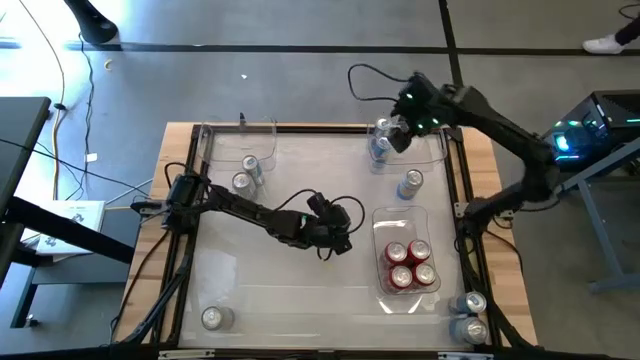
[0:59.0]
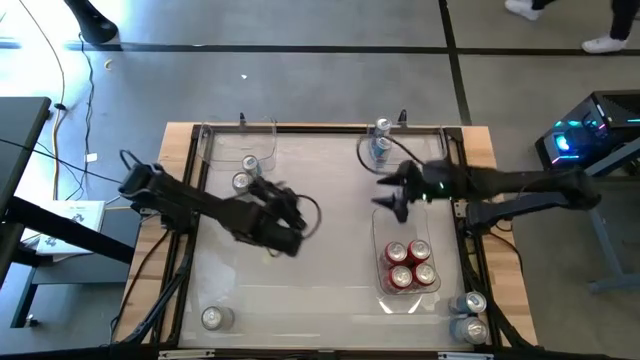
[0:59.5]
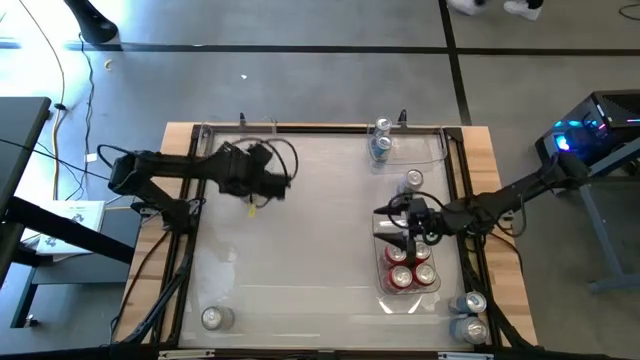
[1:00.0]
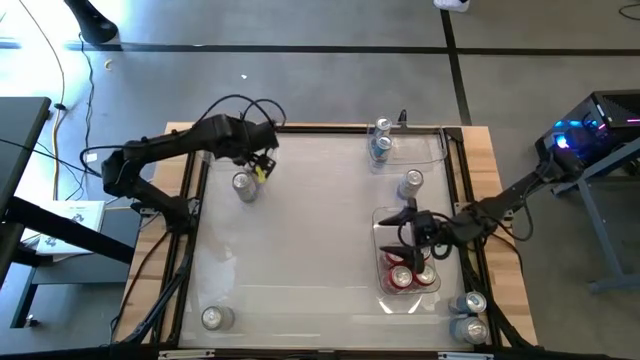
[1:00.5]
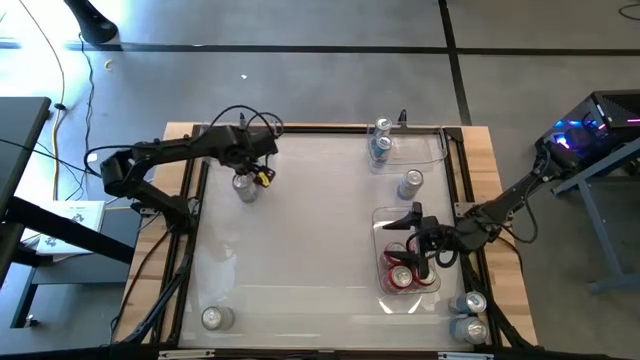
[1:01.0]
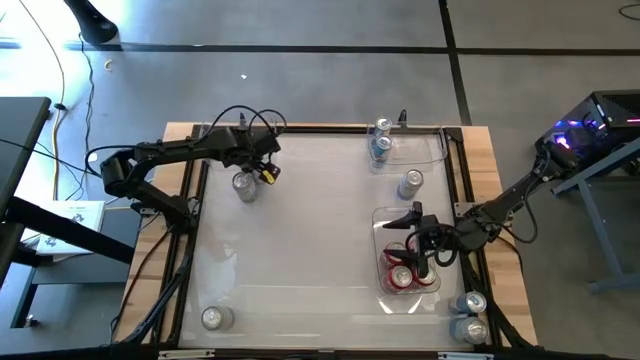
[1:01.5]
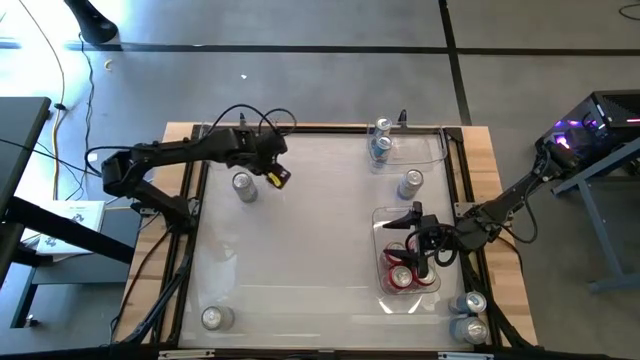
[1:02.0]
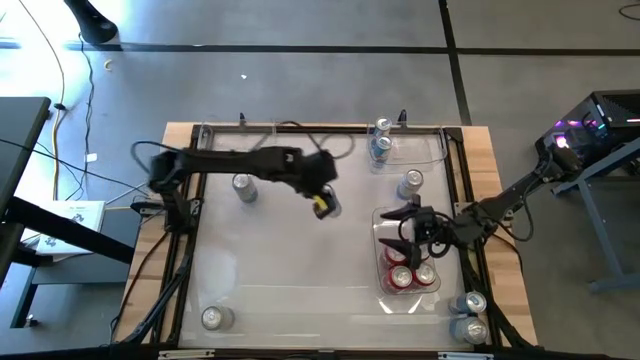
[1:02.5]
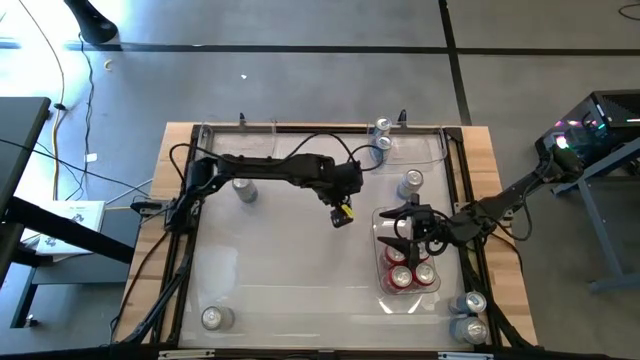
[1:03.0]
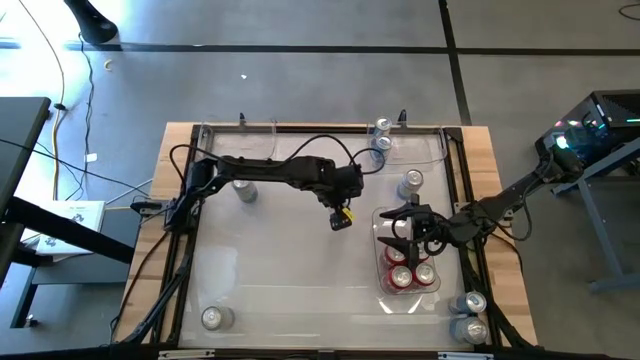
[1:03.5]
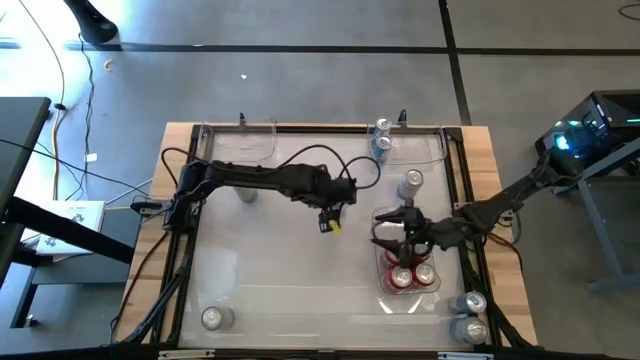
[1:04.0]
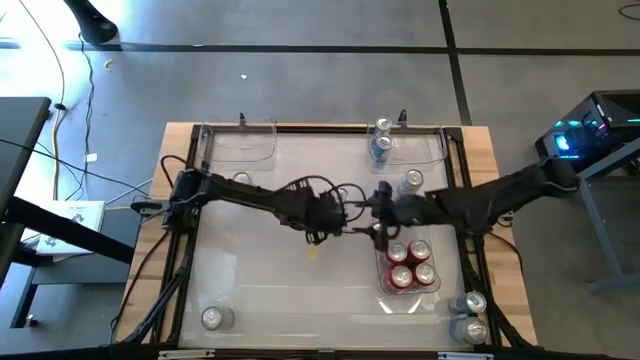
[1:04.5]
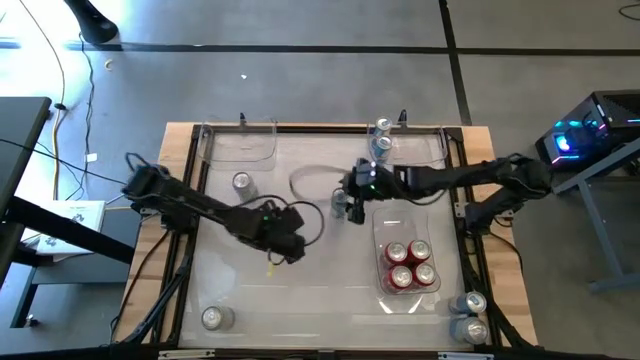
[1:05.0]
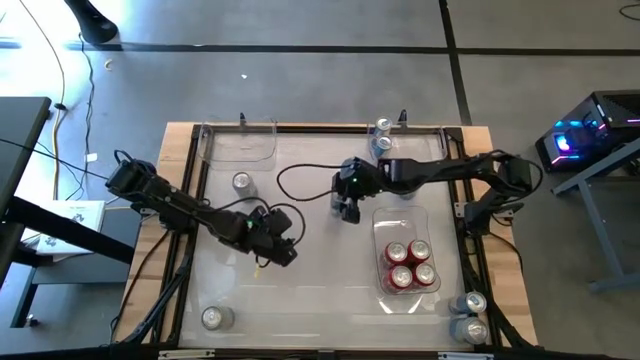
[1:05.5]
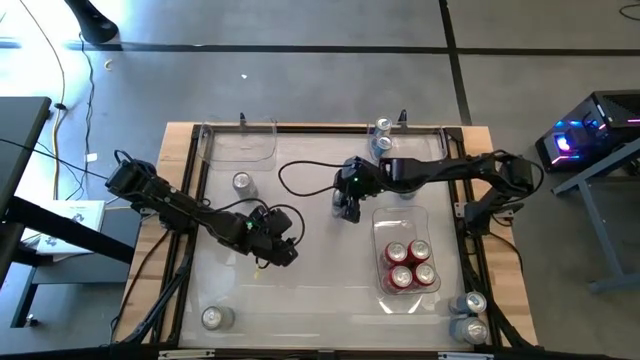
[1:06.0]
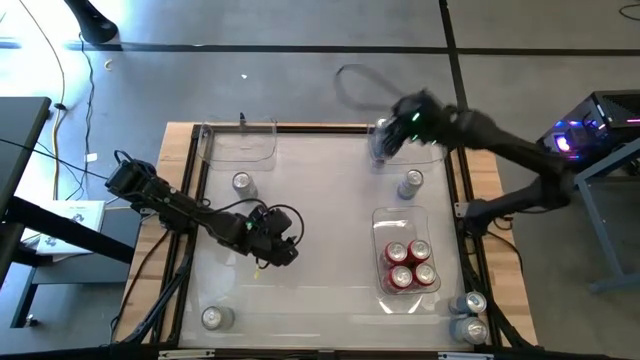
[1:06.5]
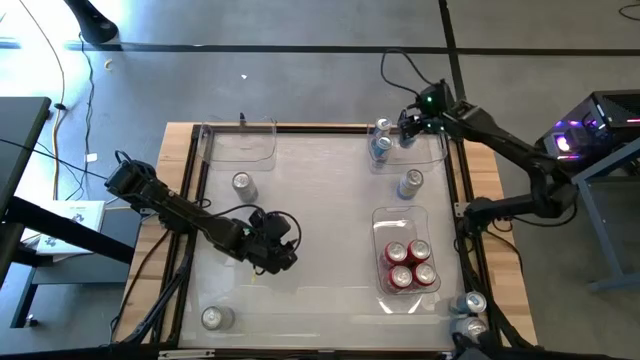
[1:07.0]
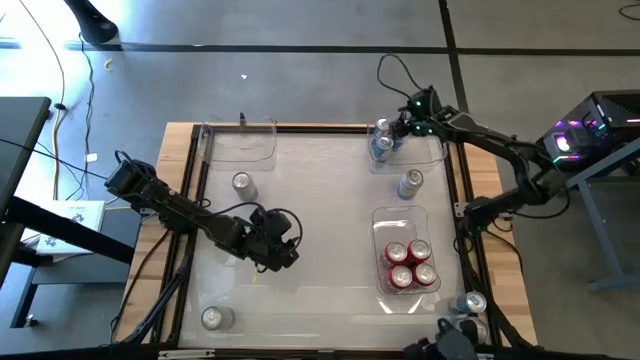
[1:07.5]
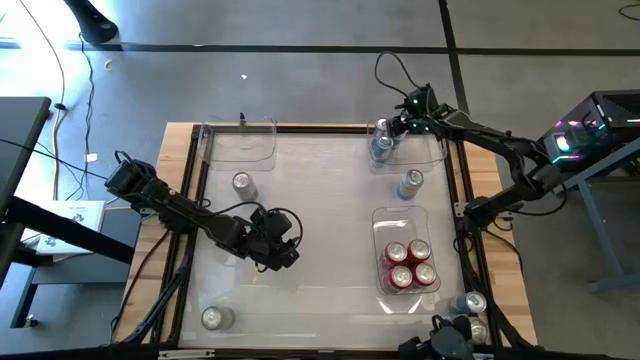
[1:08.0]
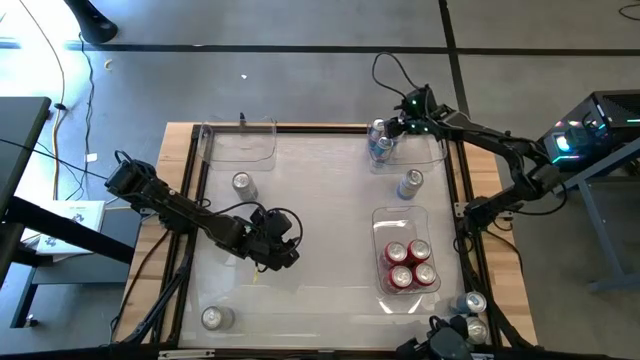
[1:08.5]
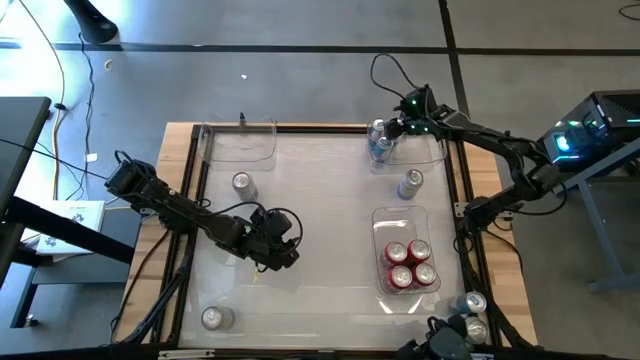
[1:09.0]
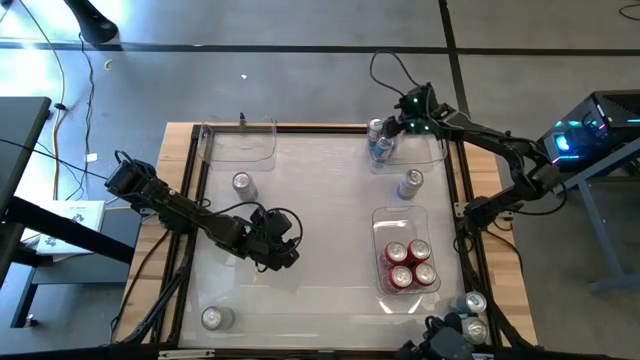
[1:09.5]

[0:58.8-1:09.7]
Task: Sort soda cans
Put the top left blue soda can into the top right transparent bin

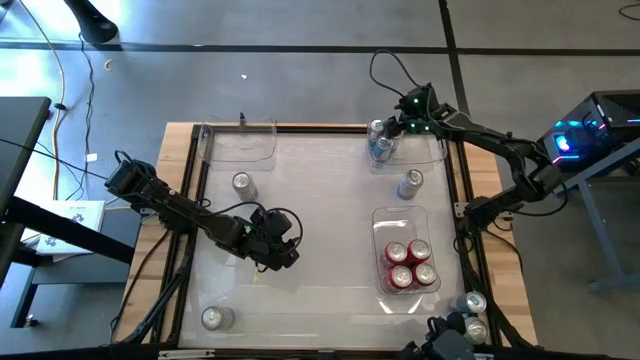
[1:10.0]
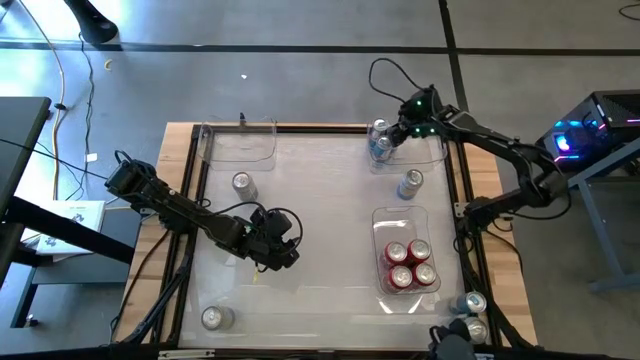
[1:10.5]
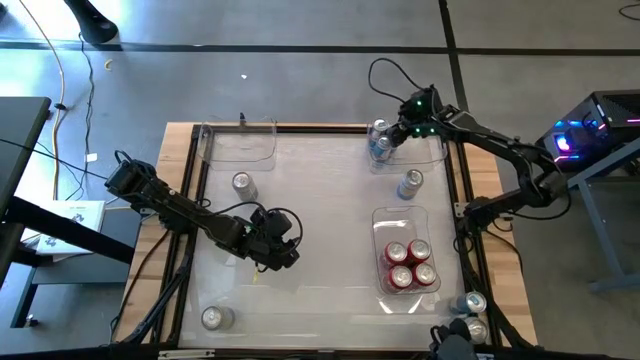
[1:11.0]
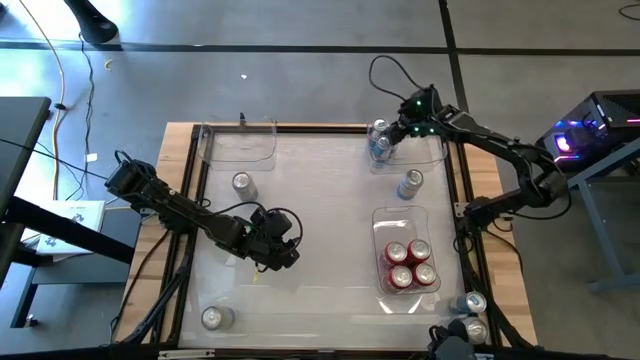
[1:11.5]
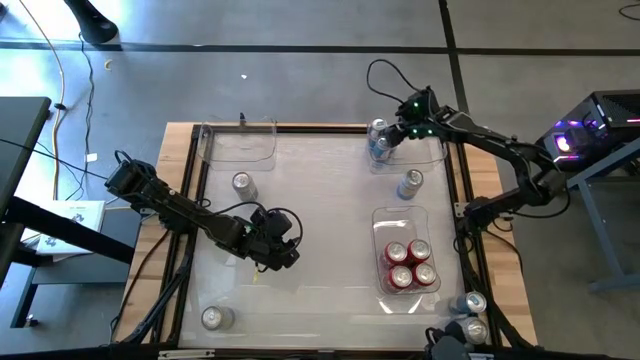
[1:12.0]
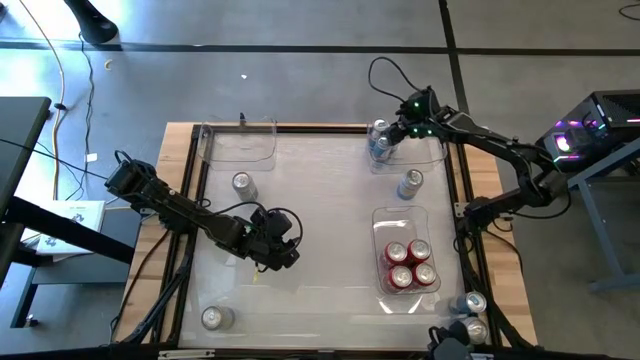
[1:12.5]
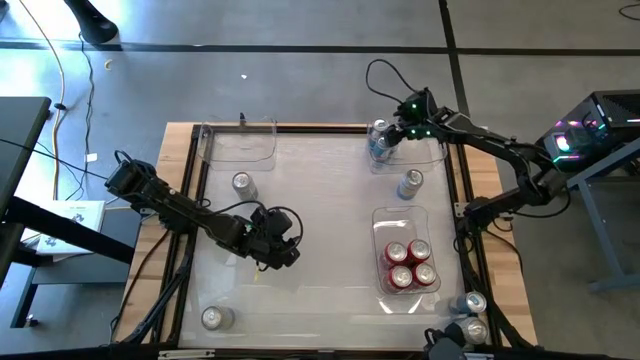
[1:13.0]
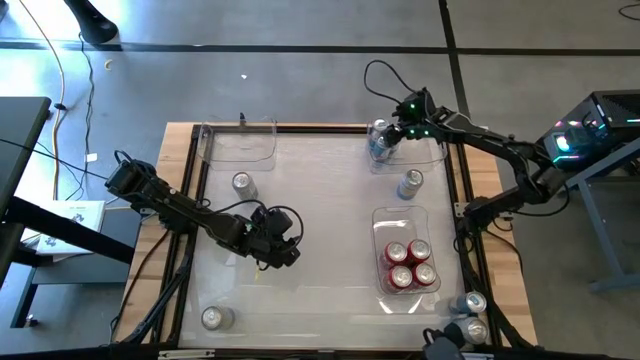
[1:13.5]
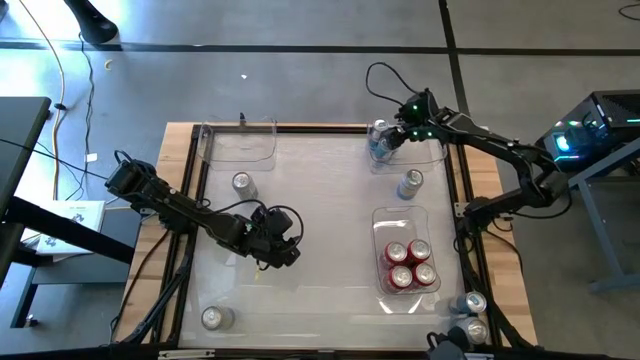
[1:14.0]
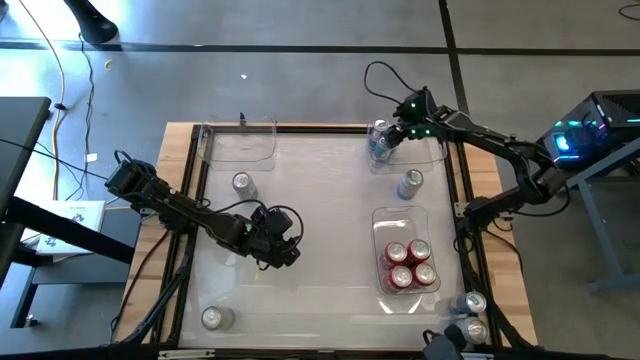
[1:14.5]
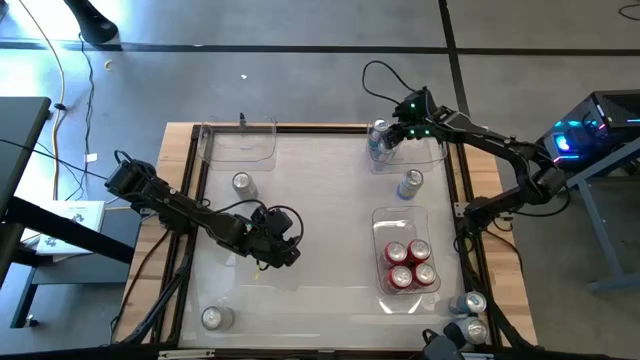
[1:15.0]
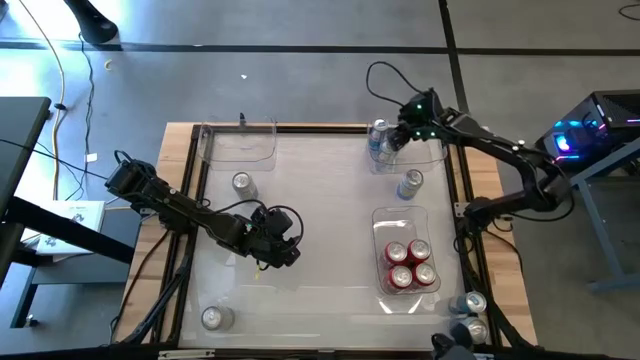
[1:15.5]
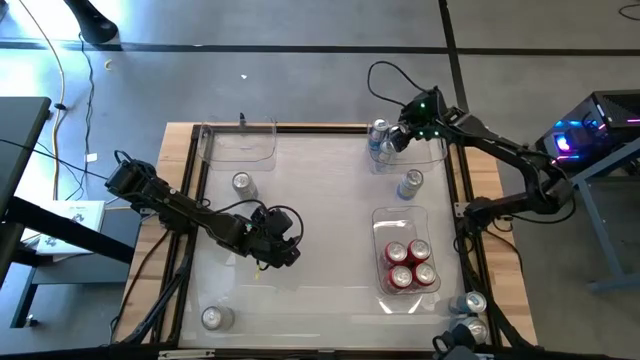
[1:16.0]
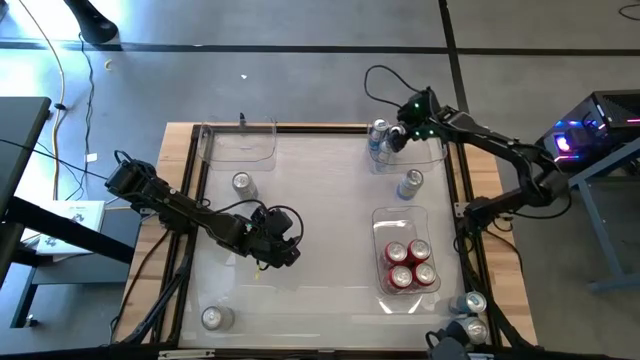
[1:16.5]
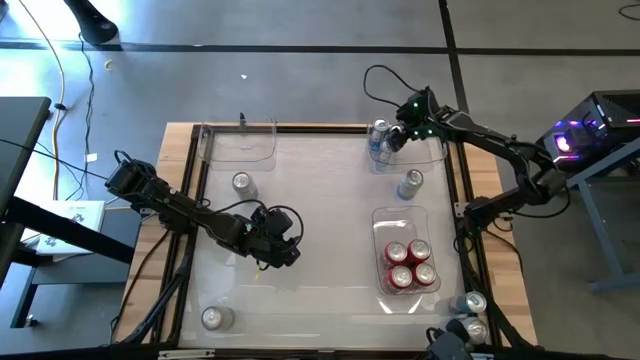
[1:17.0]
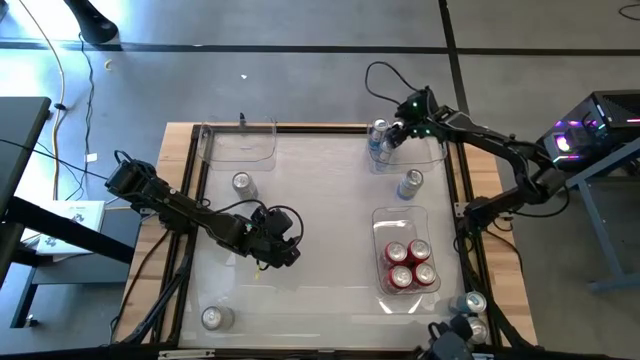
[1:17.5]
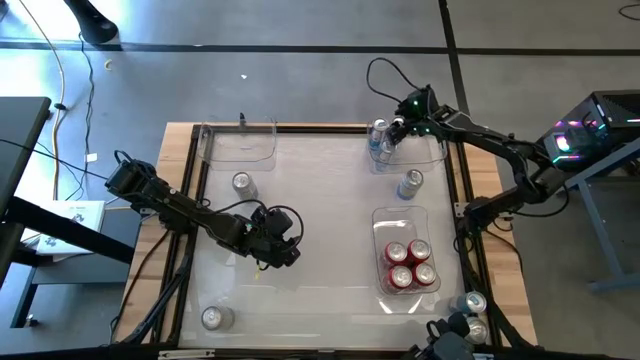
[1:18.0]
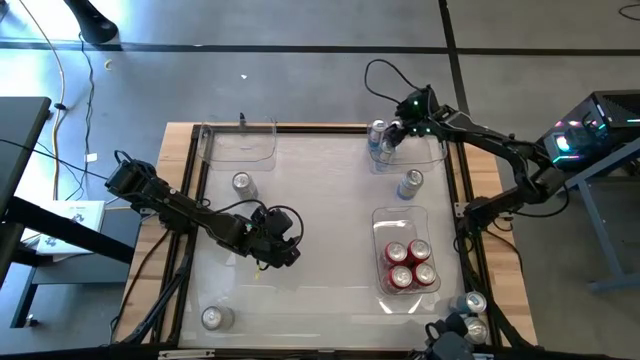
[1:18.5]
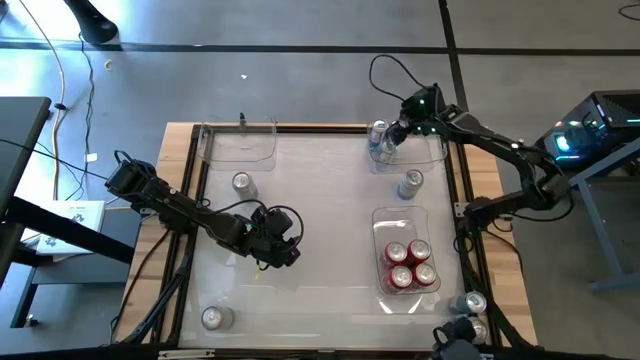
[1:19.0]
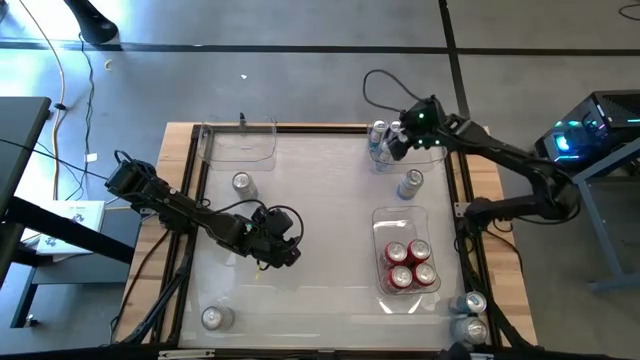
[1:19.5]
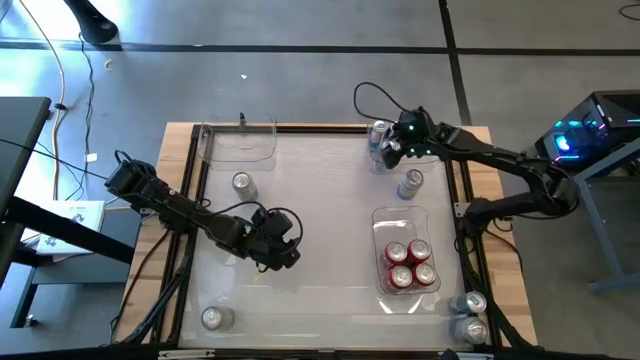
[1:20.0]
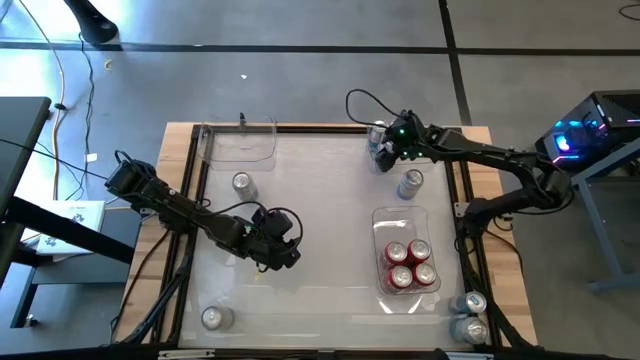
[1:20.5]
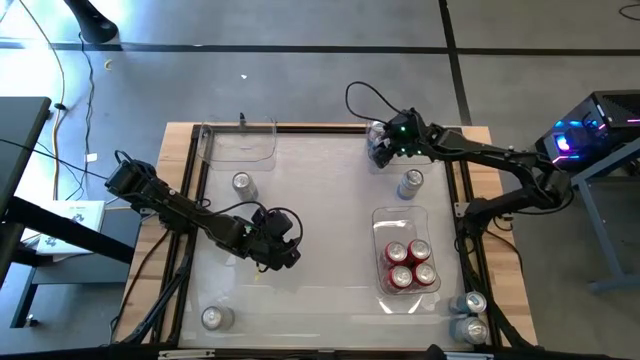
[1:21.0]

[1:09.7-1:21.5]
Adjust the blue soda cans on the top right transparent bin

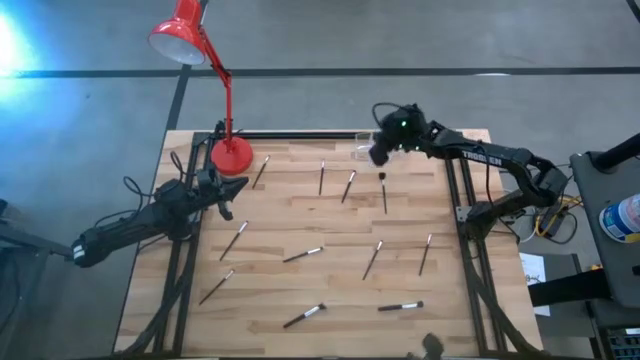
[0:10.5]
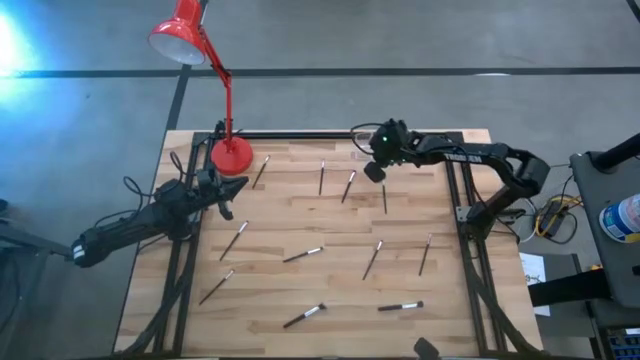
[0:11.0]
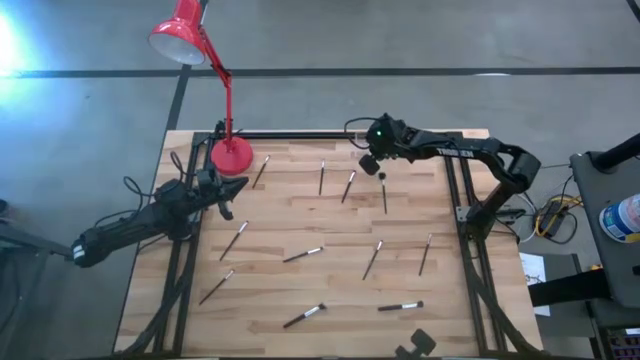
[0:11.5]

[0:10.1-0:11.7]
Task: Put items in baskets/containers
Adjust the transparent organizer
